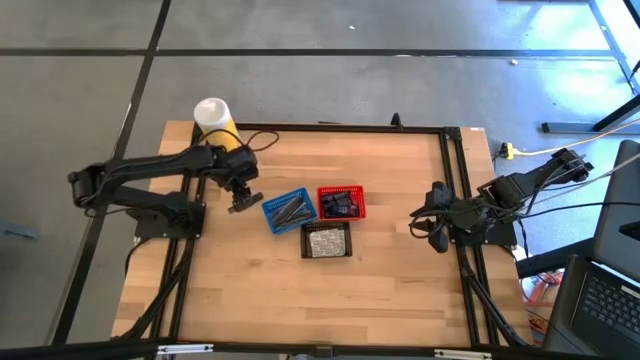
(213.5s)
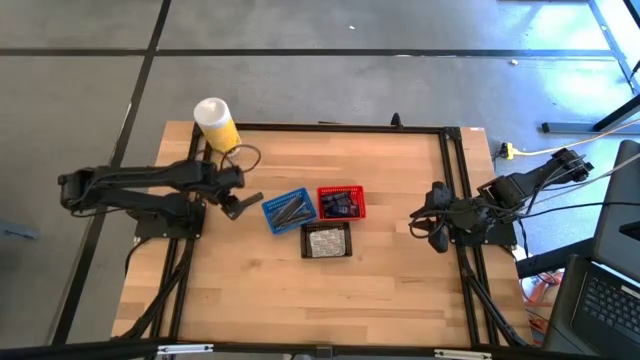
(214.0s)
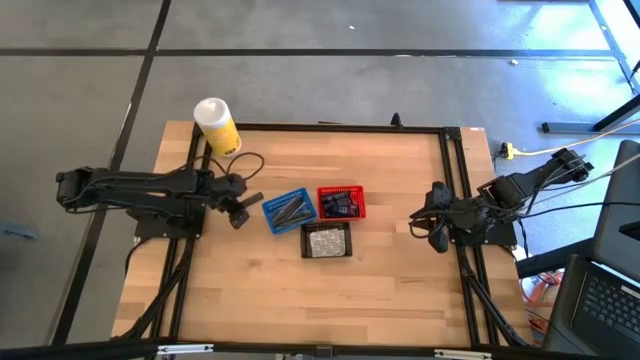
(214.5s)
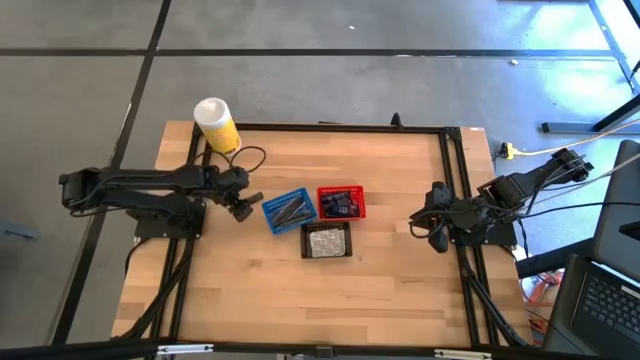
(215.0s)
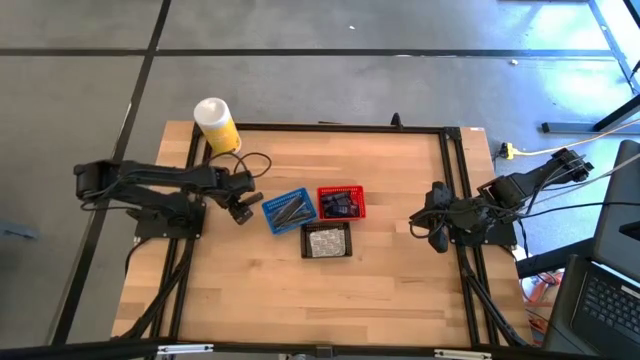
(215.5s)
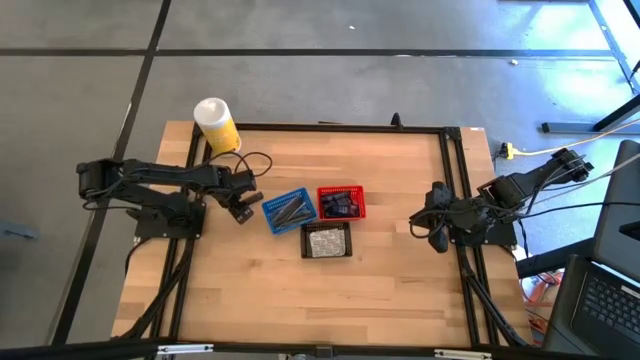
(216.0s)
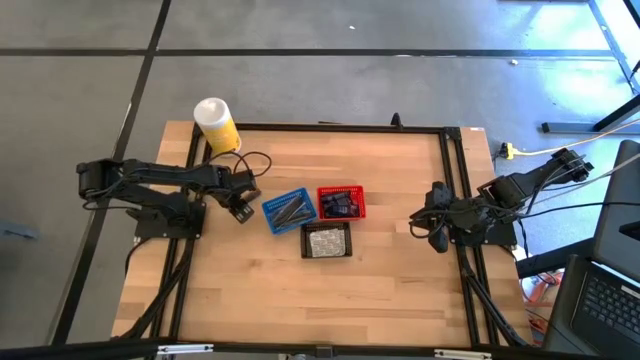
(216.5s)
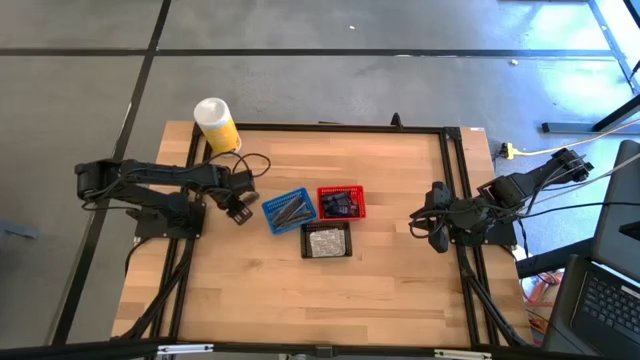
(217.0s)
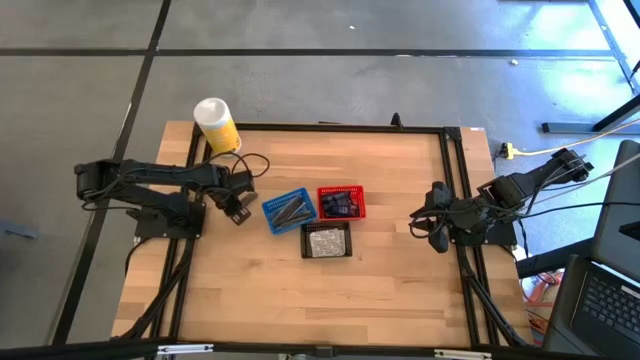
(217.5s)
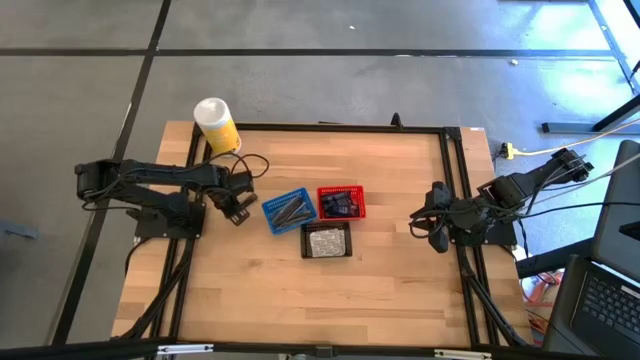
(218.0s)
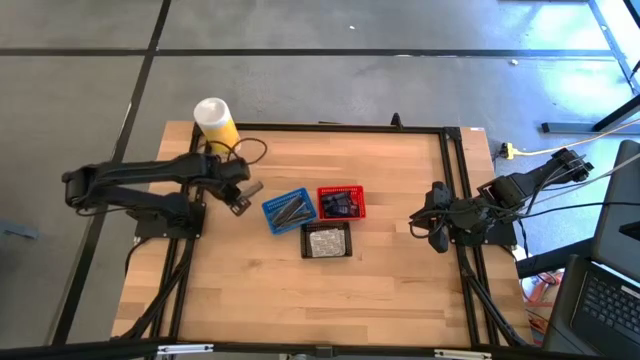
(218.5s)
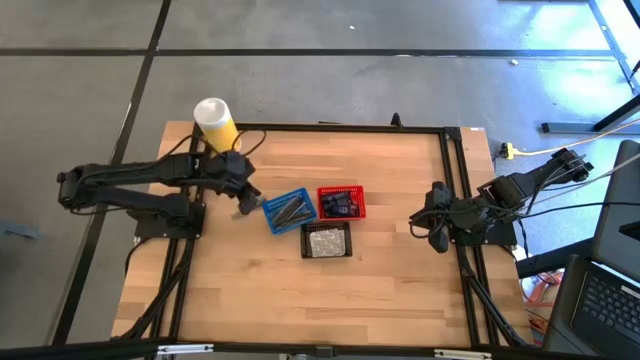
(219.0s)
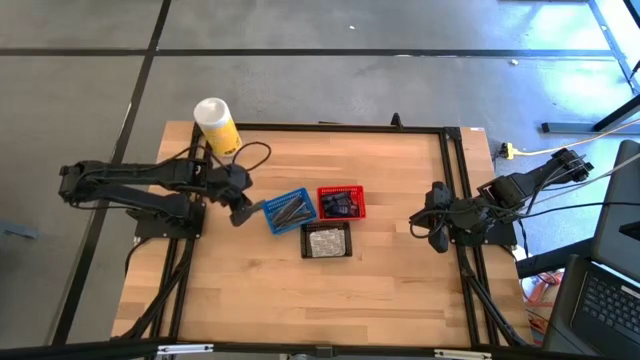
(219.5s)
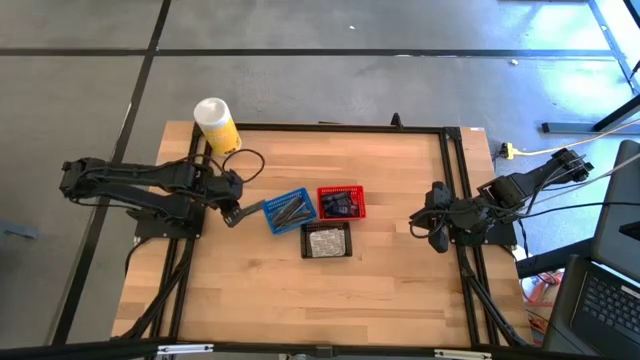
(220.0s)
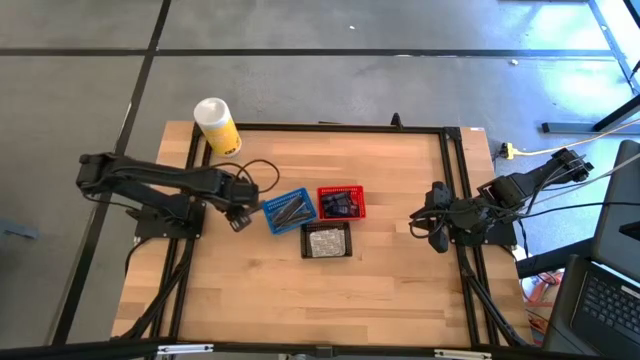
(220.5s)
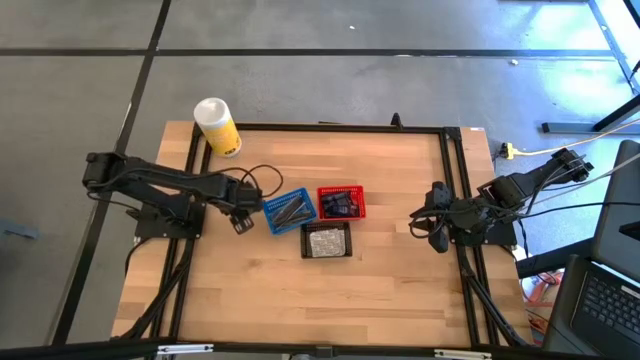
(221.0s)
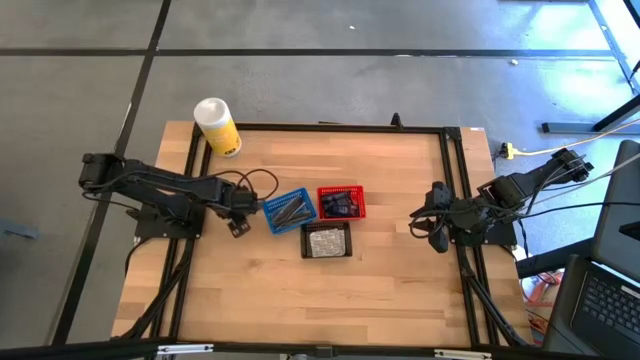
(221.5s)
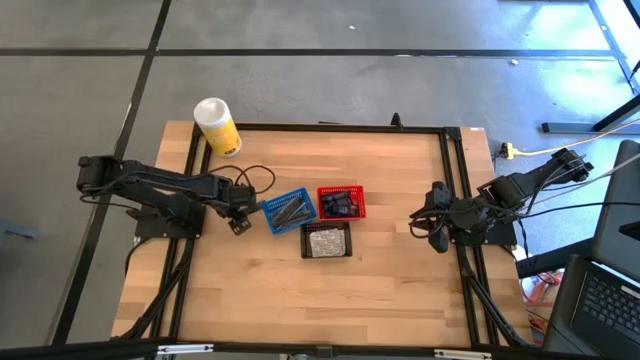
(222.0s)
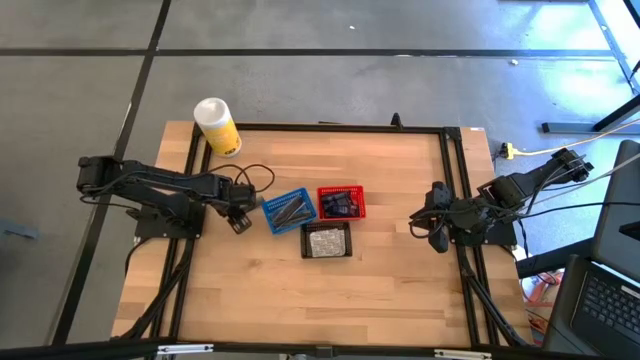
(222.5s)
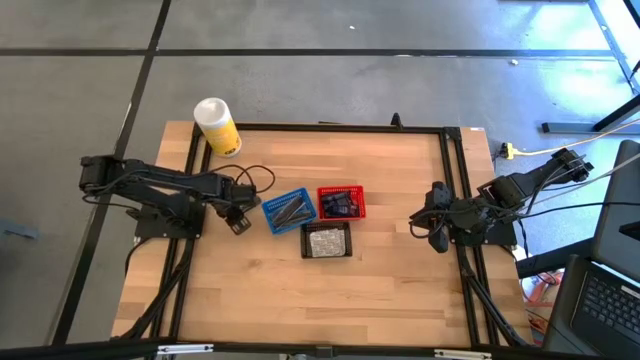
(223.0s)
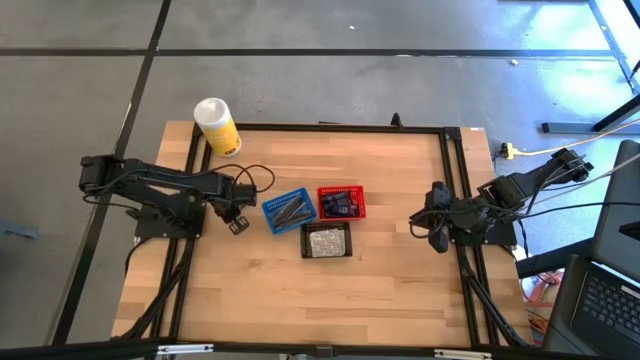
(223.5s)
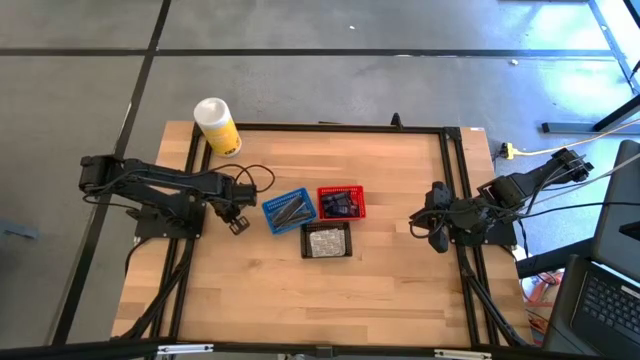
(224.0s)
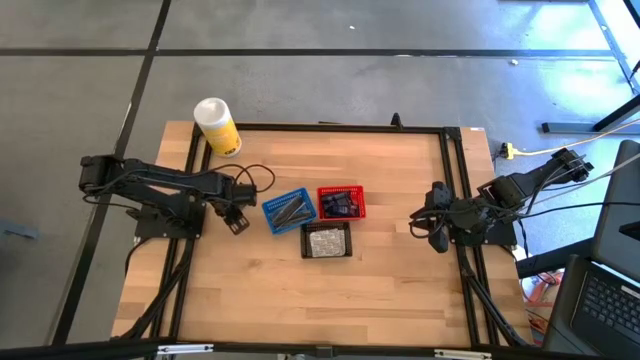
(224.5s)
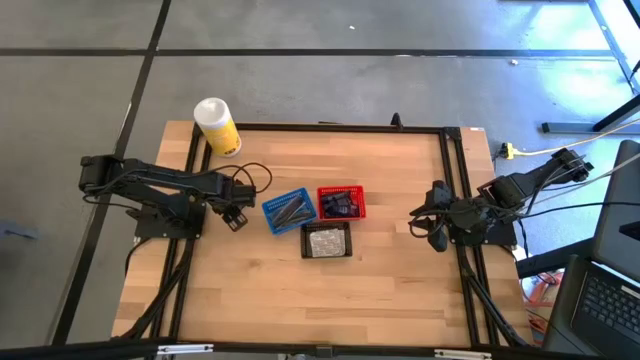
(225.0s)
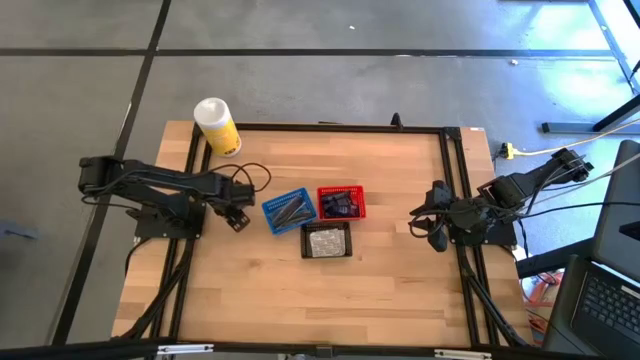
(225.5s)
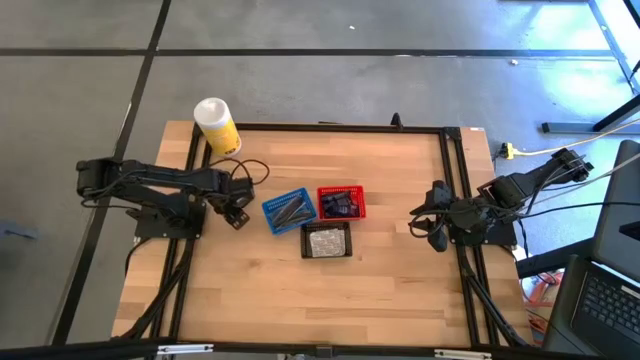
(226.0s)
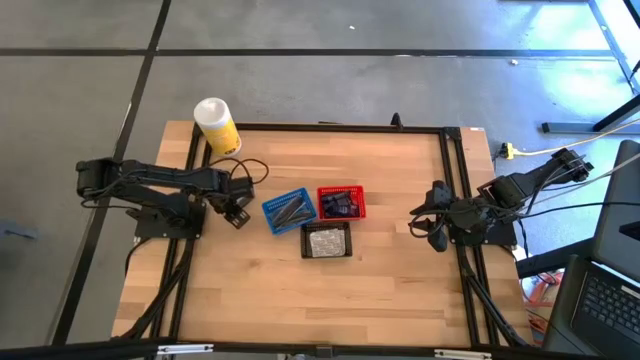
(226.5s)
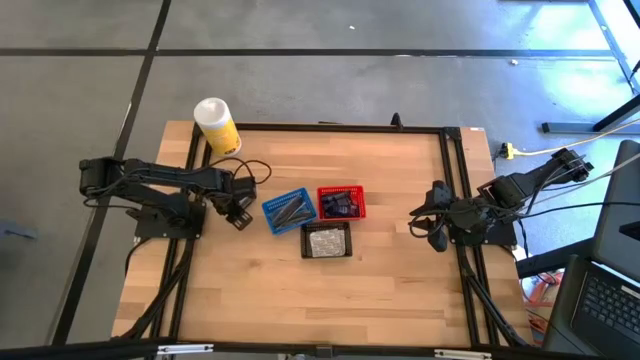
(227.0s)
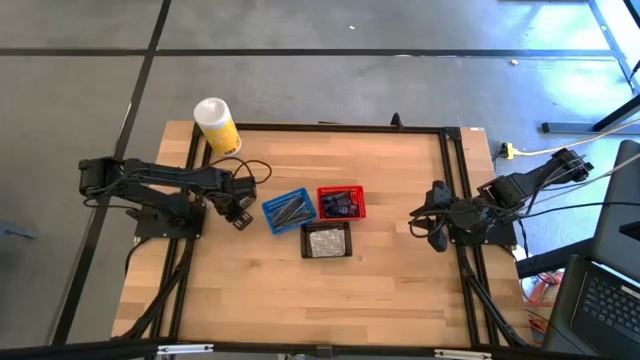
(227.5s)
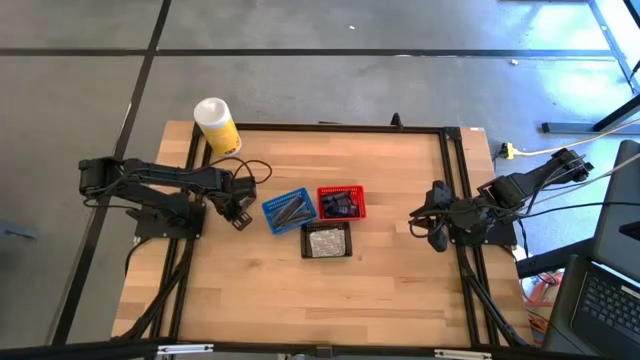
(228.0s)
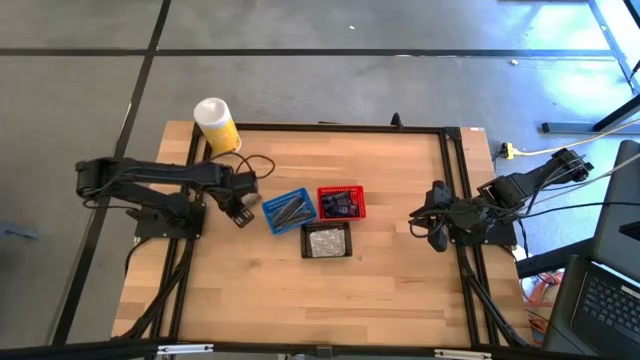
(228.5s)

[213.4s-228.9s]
Task: Pick & Place Travel size toiletries
Put the black comb into the blue bin

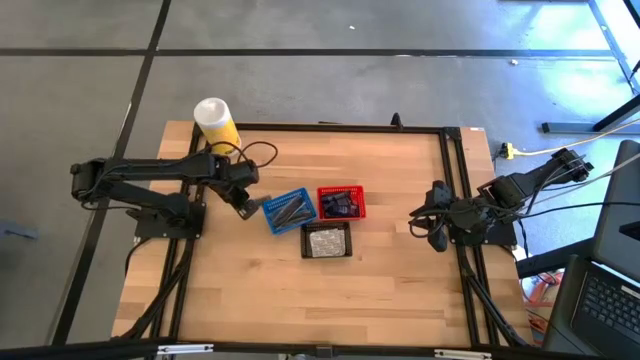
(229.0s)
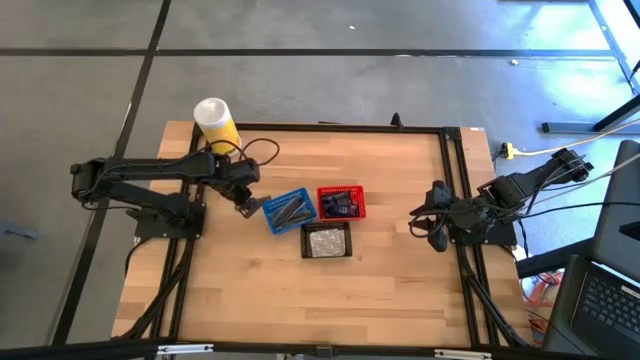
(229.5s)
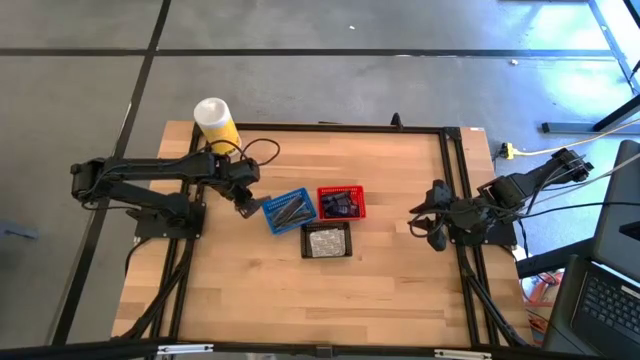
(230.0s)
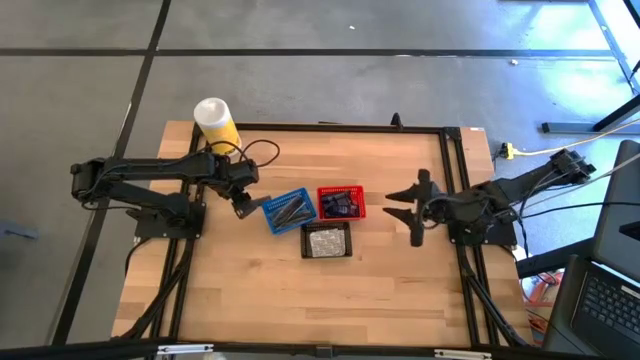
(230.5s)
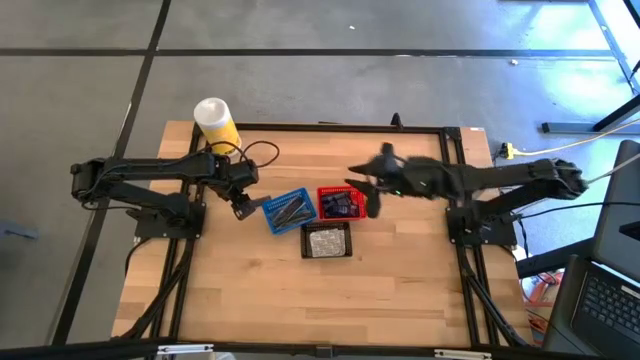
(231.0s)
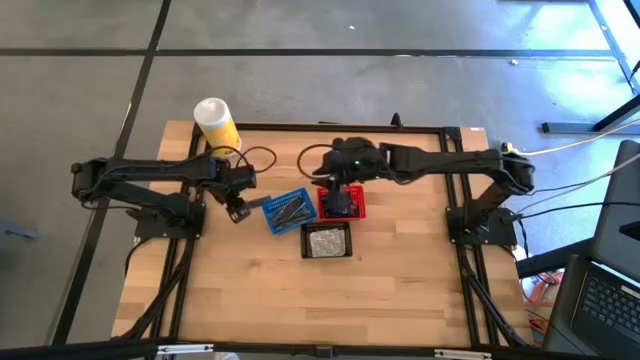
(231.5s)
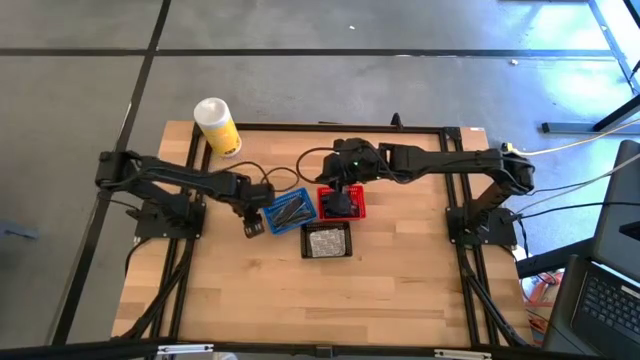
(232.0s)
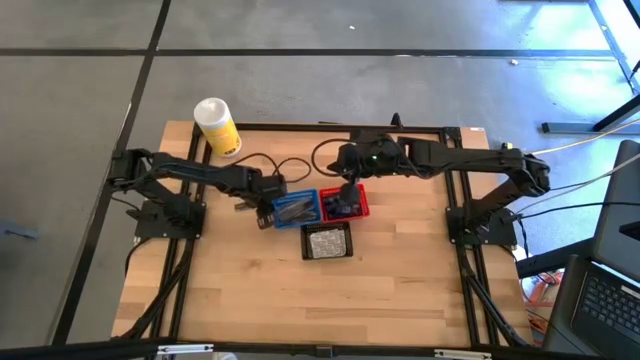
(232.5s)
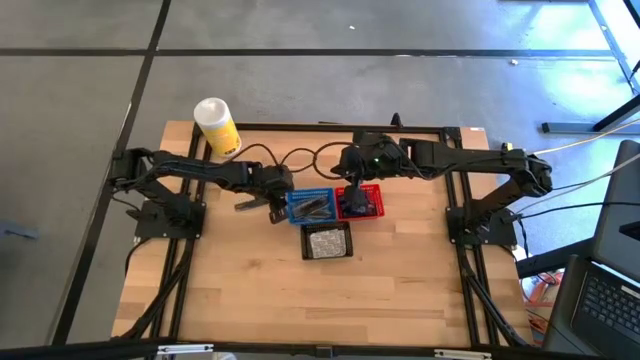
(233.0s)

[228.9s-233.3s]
Adjust the blue bin

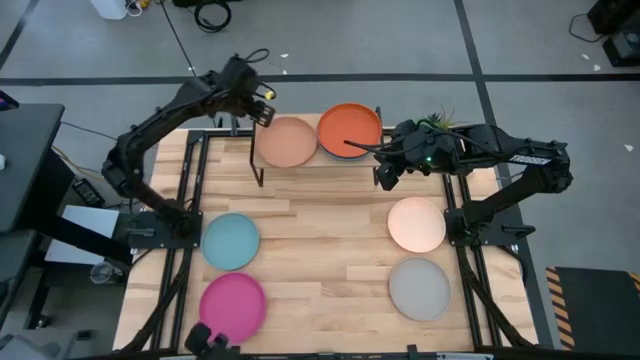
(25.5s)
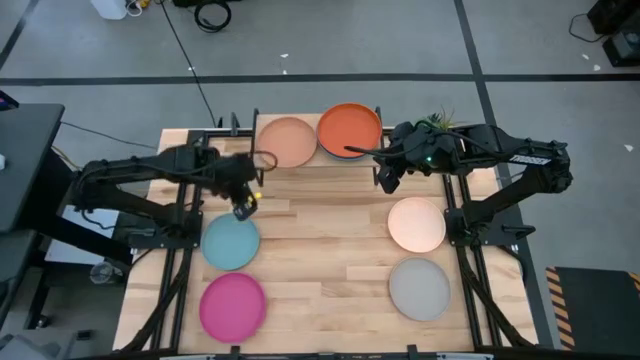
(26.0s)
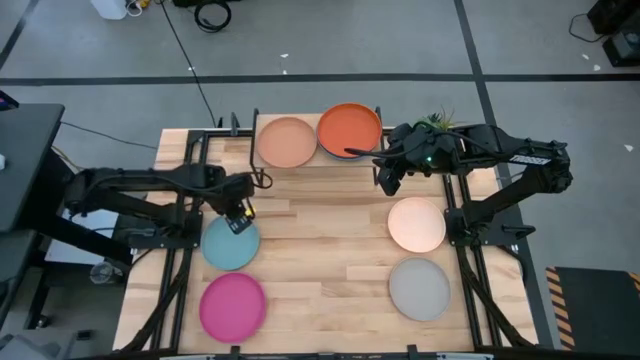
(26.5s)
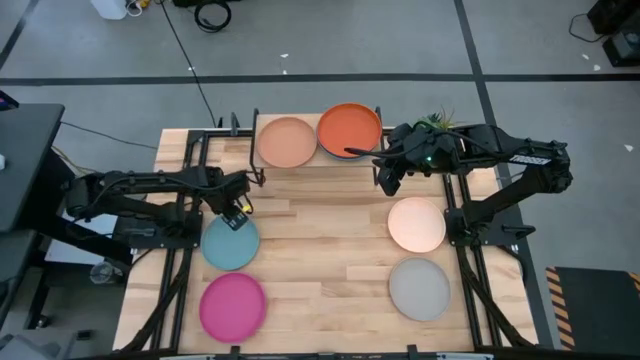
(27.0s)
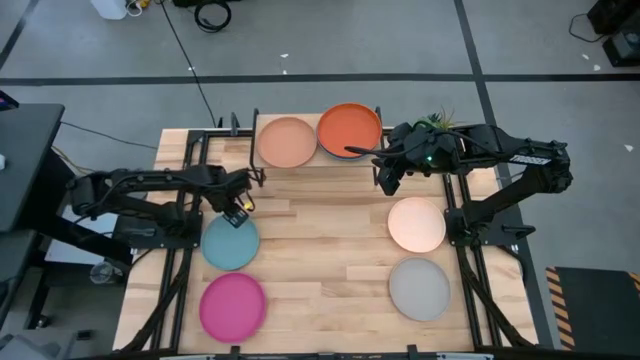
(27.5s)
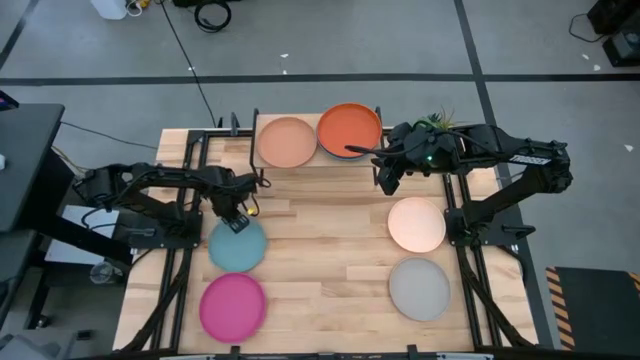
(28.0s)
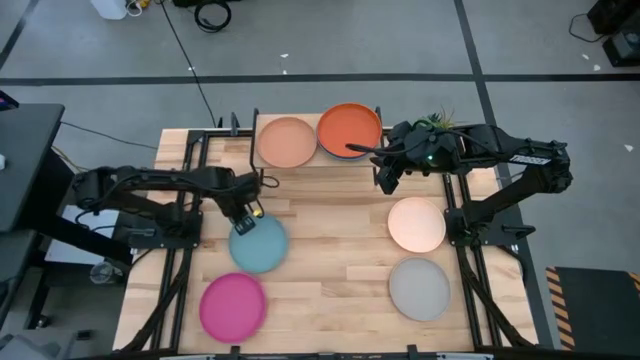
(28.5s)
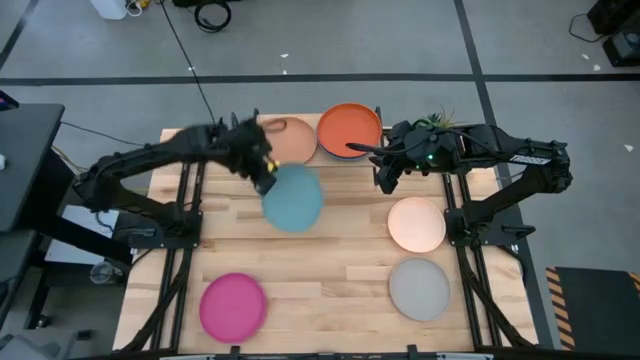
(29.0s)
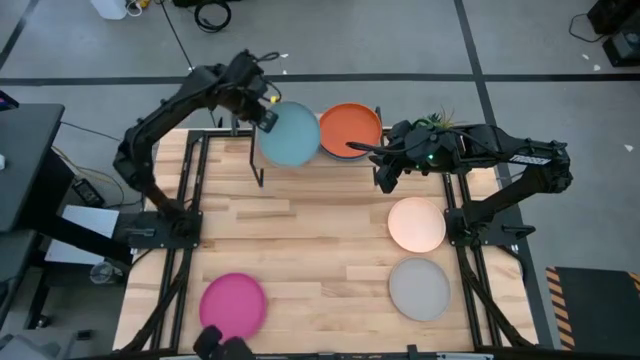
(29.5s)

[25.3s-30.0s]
Task: Place and stack plates onto a shelf
Stack the light blue plate into the brown plate on the shelf
